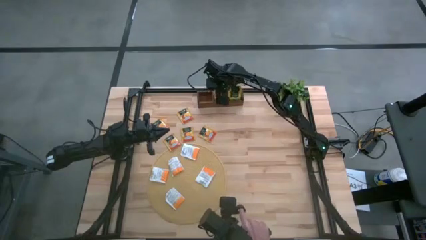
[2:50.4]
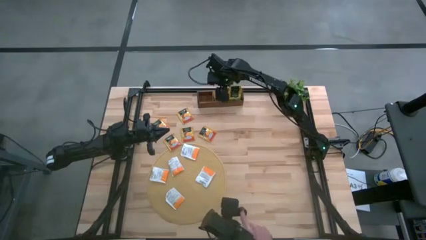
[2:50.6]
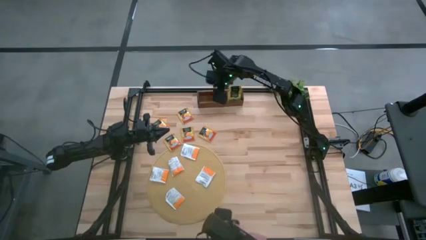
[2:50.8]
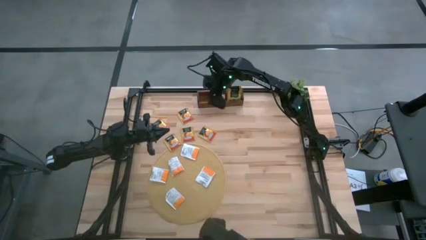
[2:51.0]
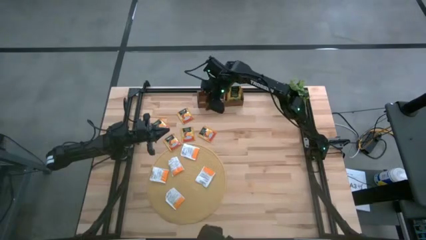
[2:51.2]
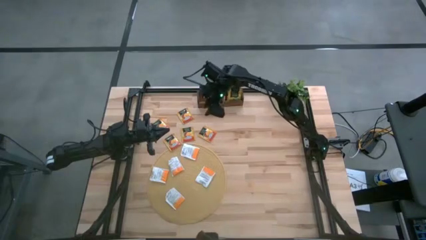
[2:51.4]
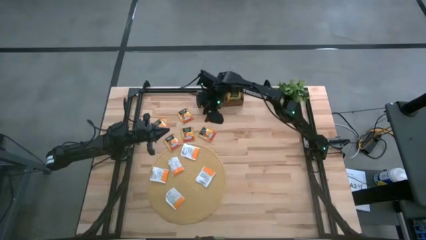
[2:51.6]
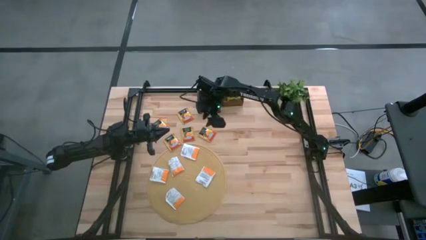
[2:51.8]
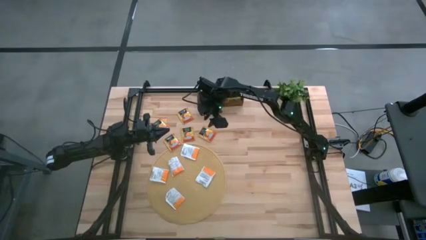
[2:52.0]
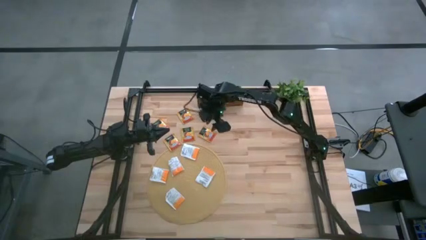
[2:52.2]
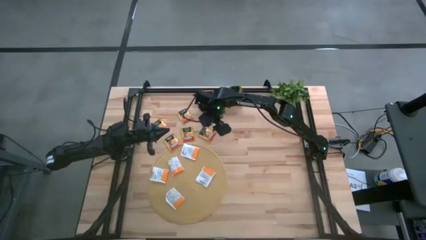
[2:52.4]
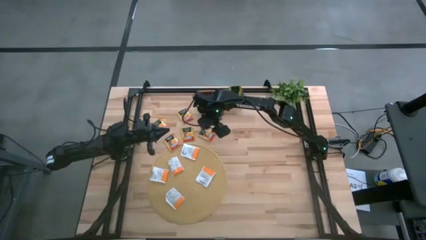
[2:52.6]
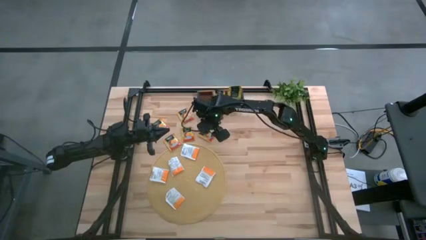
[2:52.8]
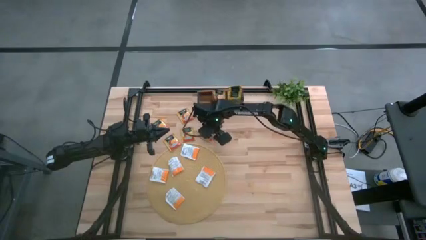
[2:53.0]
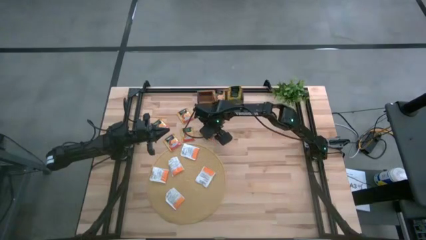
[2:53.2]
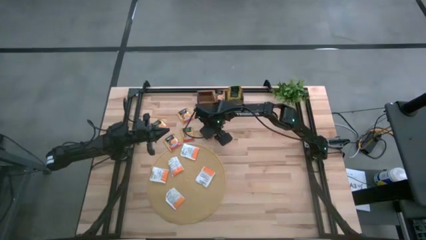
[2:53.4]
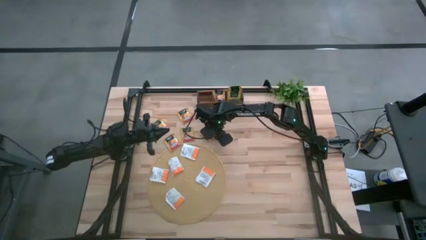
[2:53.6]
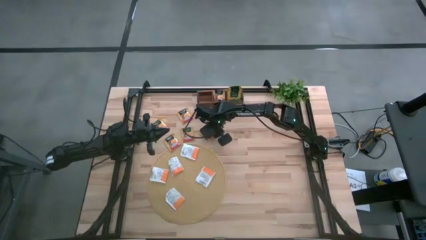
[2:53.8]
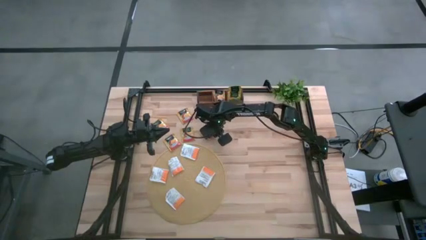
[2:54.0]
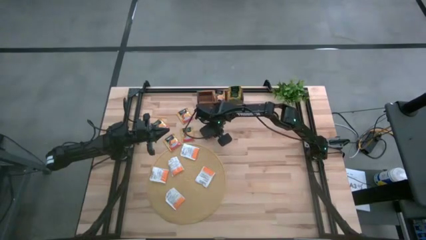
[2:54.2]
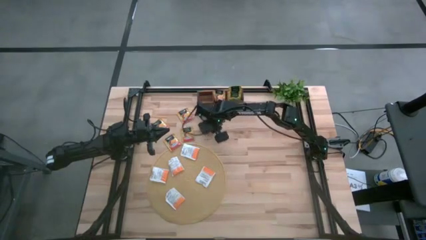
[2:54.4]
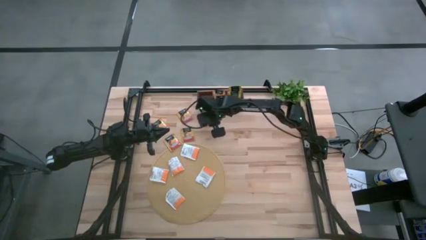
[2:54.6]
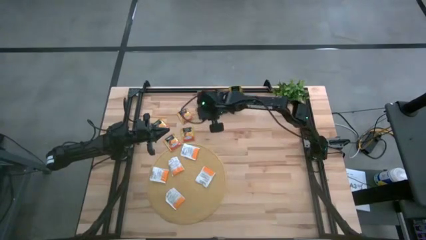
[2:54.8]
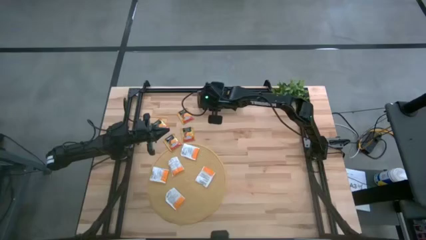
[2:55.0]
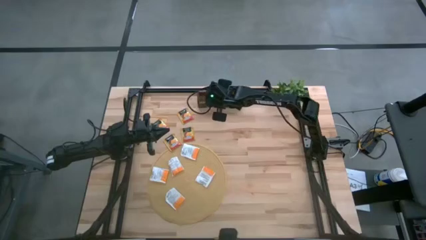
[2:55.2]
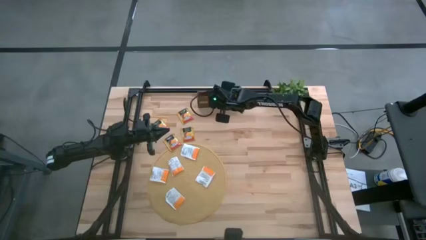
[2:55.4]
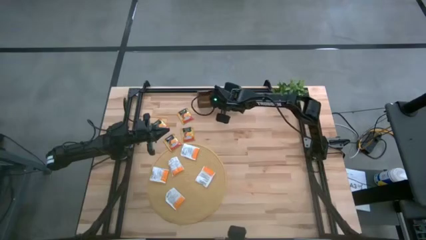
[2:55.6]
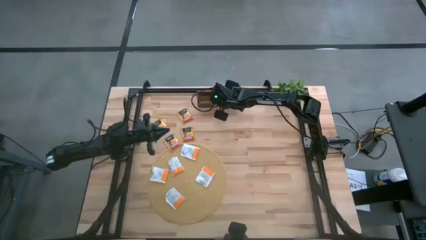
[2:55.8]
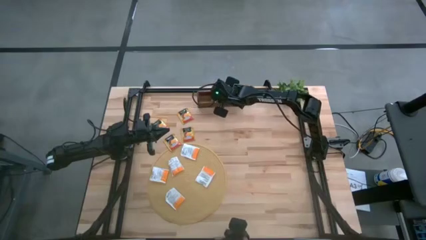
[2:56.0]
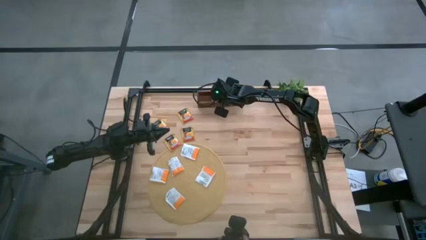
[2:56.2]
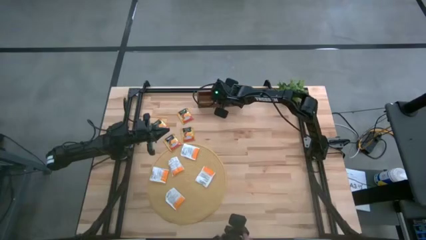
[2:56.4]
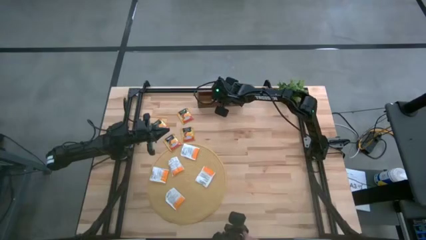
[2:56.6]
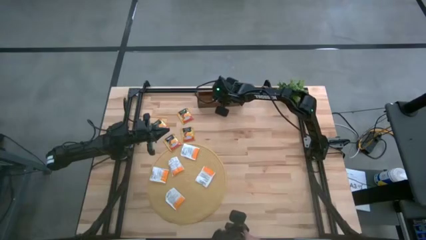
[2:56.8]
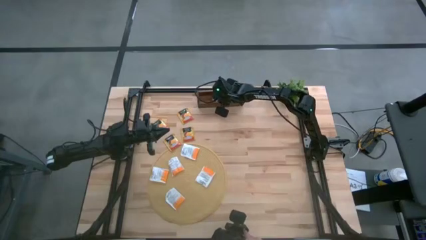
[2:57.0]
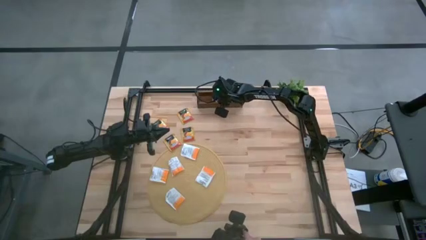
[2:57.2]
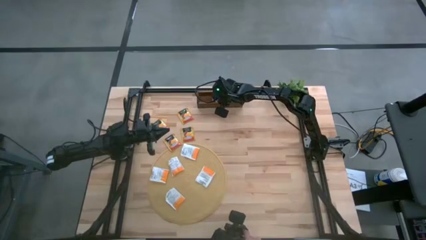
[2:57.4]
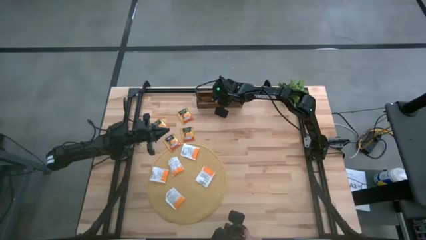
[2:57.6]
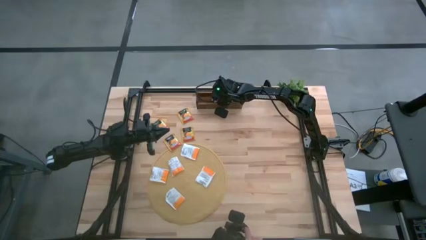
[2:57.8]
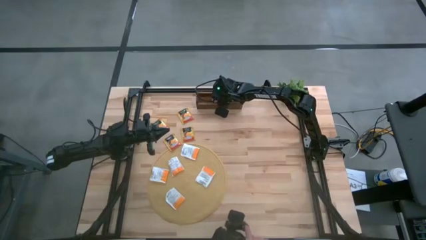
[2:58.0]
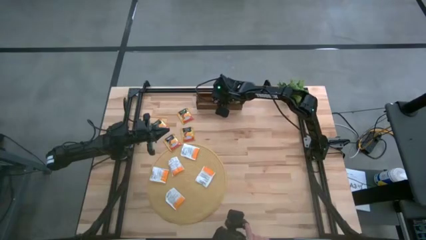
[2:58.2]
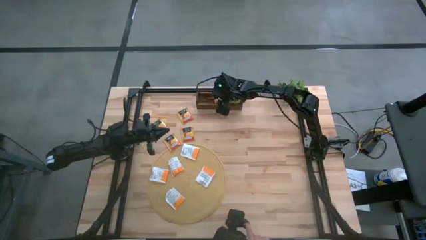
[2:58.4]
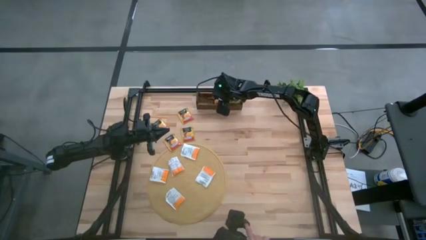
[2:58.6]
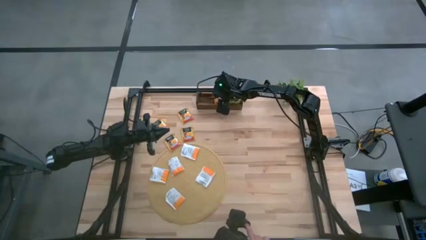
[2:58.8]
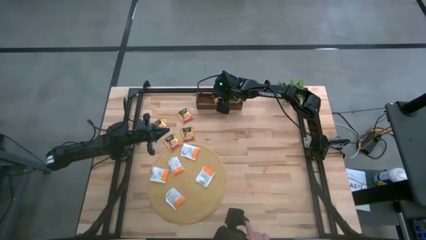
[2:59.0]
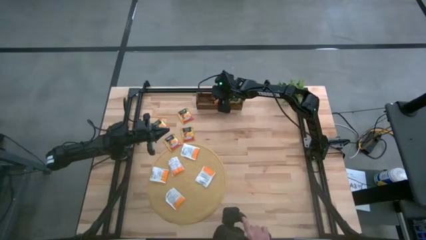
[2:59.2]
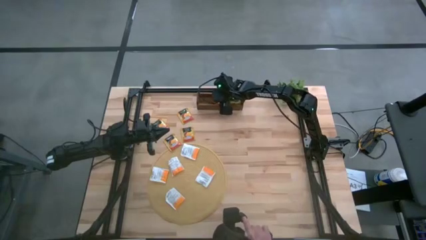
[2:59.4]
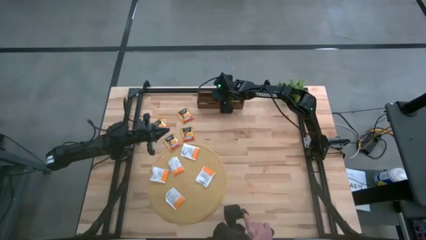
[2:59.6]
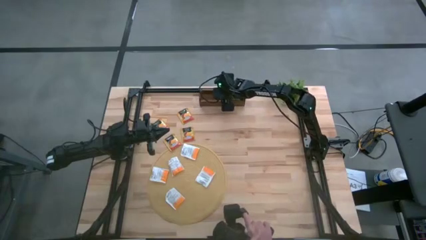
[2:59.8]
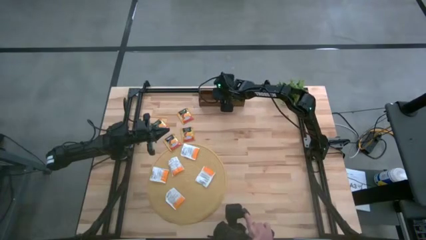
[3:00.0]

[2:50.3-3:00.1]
Task: Pick & Place Tea
Put the yellow tea bag into the middle slot of the wooden organizer

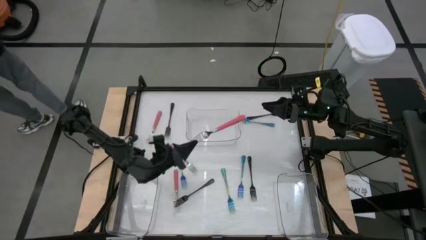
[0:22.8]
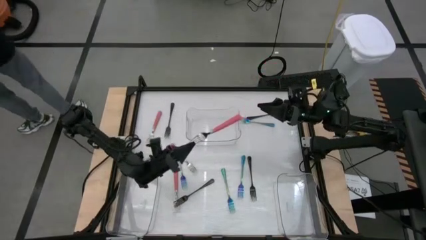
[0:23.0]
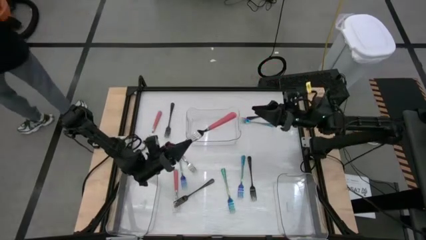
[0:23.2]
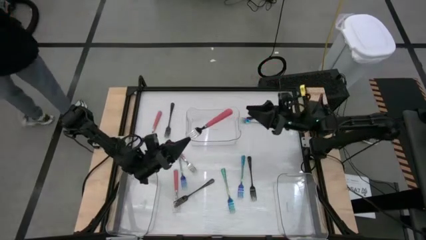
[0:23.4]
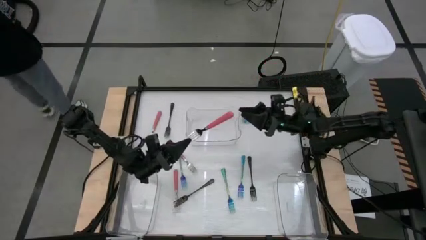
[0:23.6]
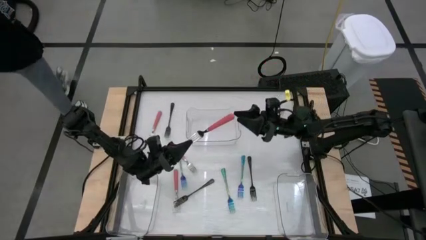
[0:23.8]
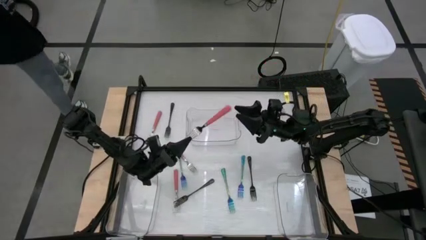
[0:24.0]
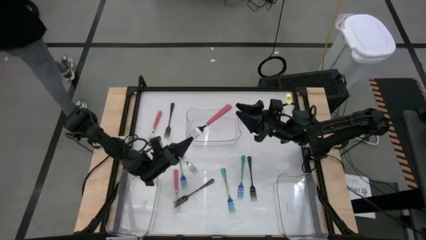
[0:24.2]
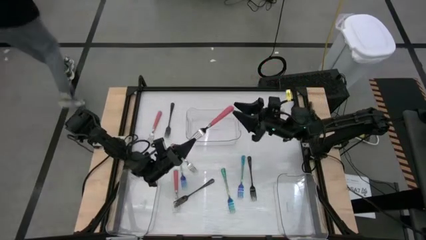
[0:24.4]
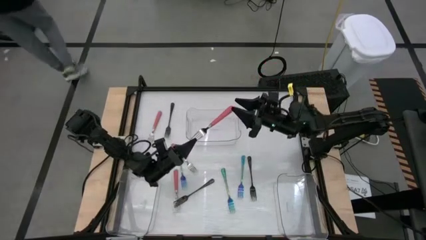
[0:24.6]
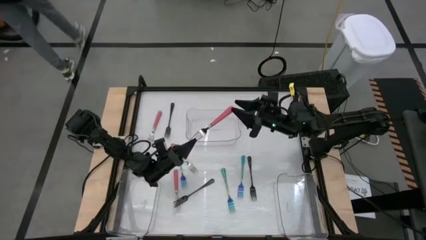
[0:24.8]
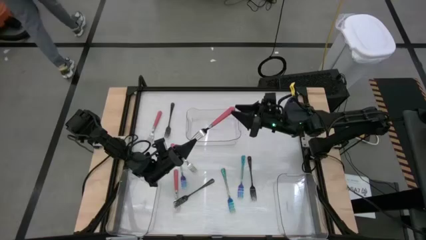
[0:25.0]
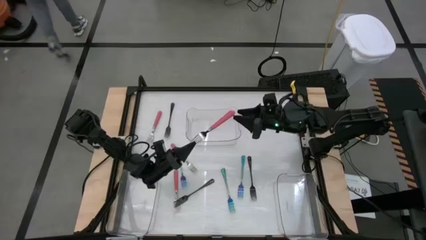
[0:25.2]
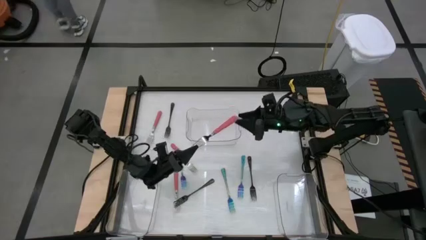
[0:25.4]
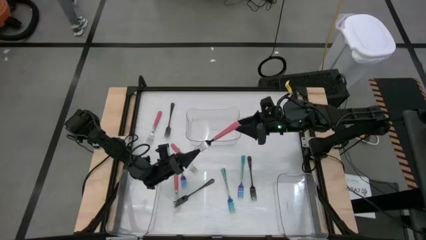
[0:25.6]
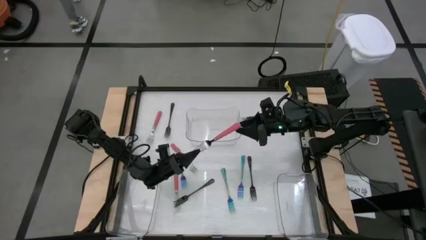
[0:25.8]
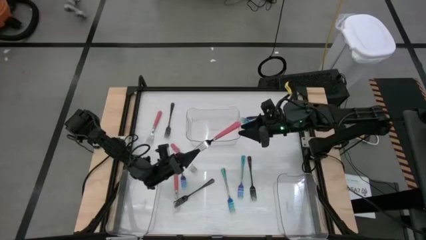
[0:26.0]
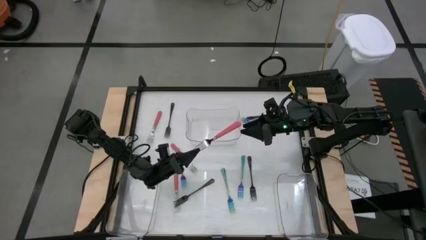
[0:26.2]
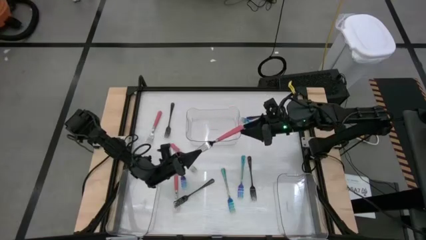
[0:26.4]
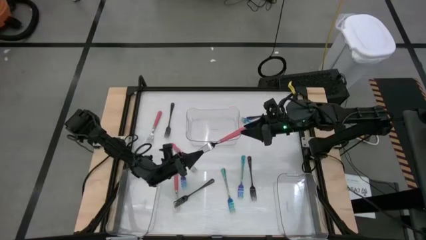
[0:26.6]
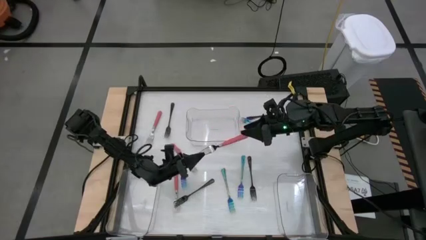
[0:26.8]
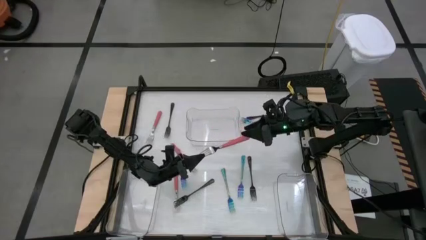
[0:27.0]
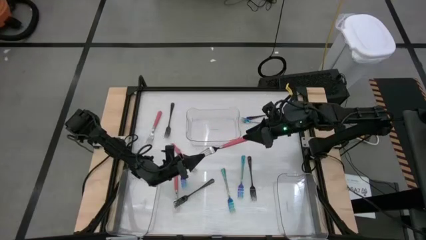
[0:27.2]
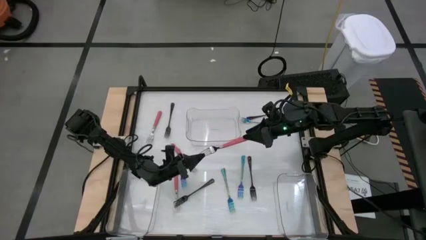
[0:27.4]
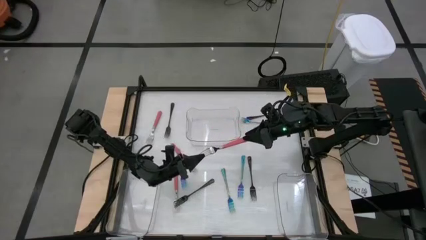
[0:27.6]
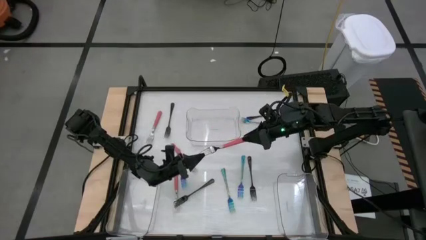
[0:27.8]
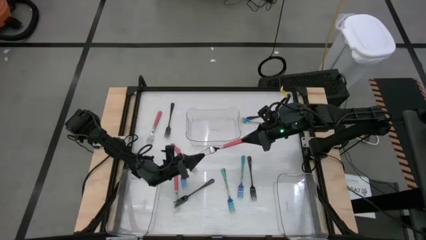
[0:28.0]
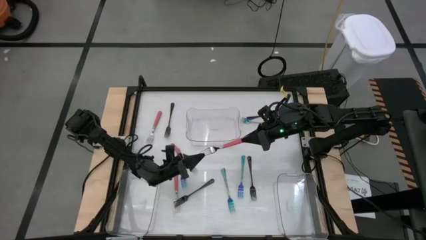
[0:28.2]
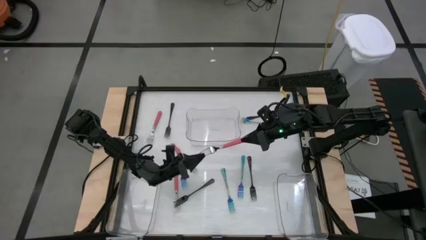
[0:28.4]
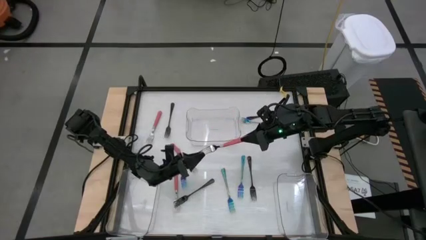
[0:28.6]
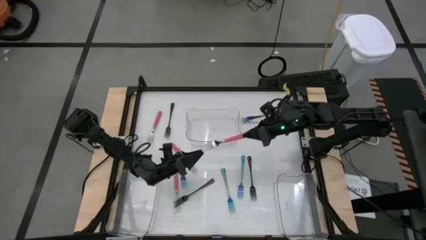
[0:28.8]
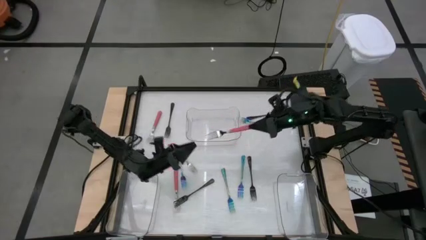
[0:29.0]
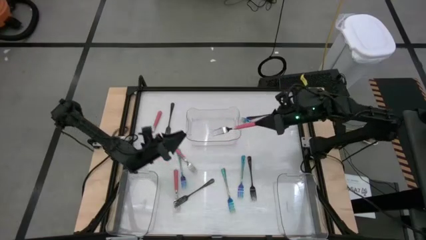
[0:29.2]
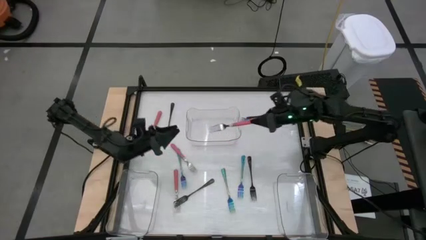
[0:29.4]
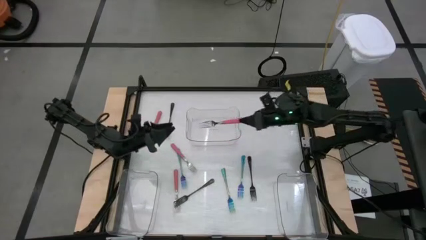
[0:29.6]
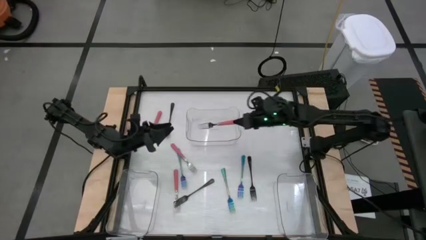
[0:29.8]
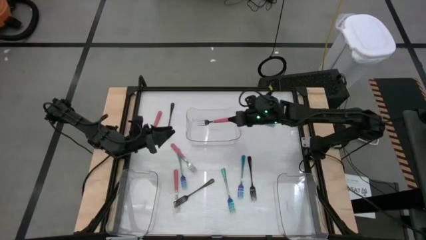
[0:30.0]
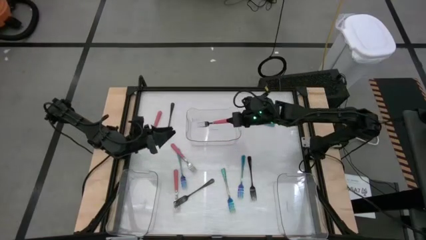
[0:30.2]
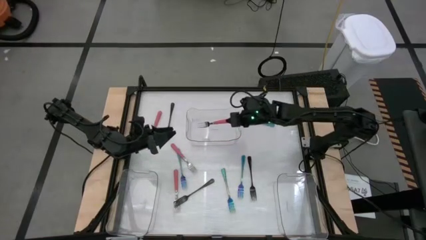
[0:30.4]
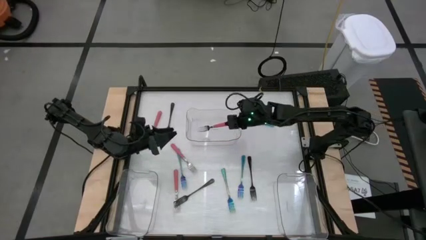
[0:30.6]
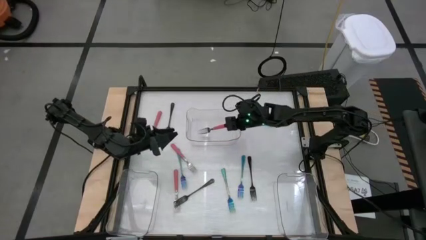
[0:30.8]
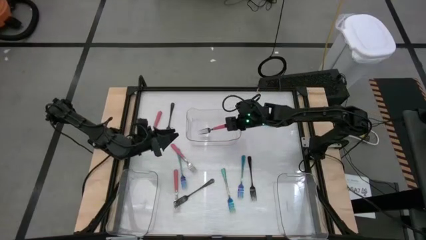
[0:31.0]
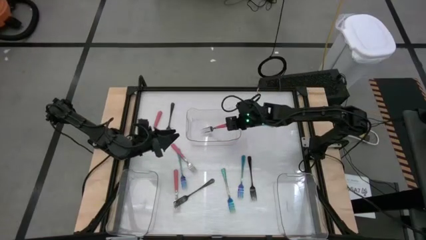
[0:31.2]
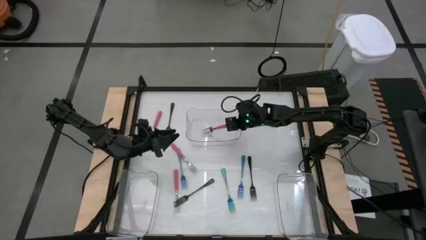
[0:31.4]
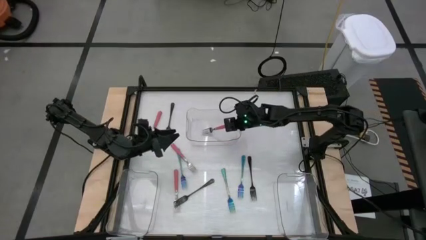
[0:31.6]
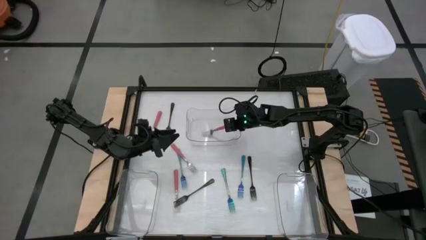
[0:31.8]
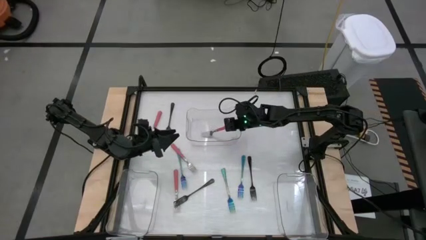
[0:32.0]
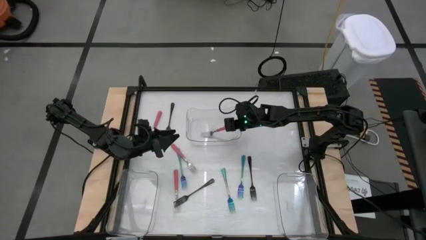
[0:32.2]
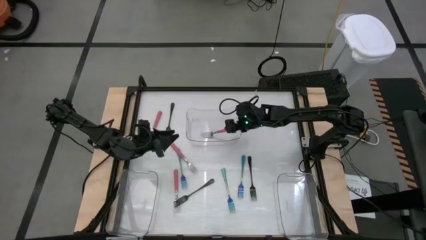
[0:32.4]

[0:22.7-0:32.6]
Task: Sort silverware by color (type)
Put the pink fork into the middle transparent bin
